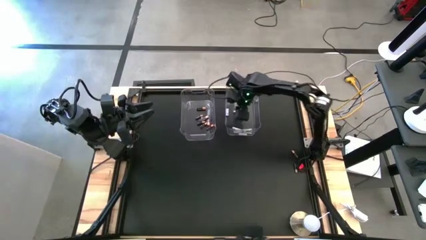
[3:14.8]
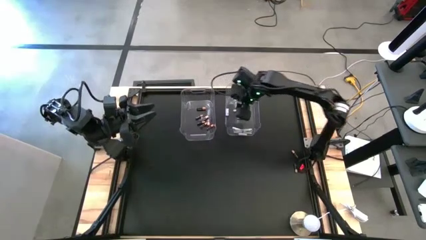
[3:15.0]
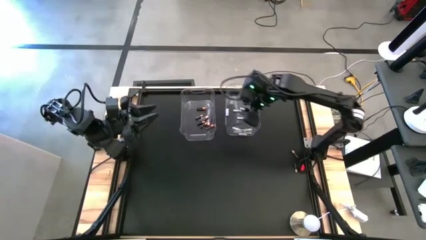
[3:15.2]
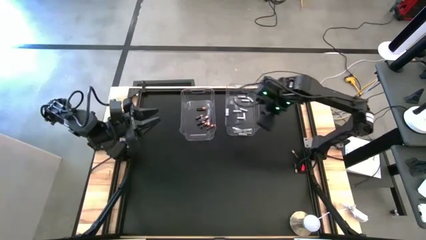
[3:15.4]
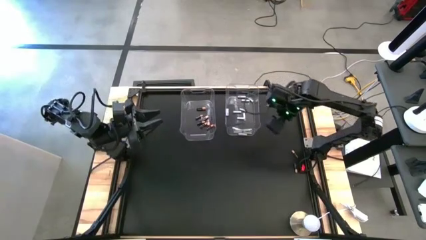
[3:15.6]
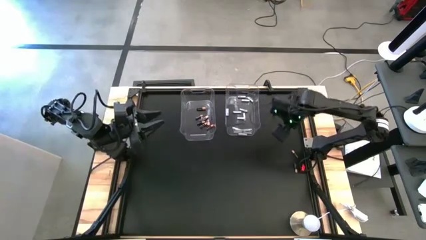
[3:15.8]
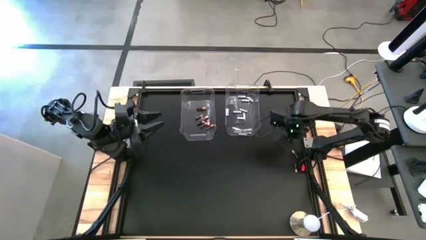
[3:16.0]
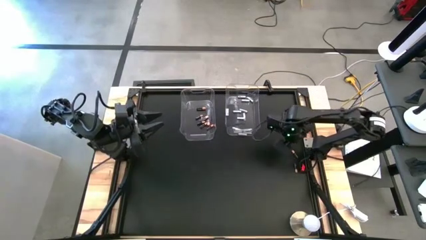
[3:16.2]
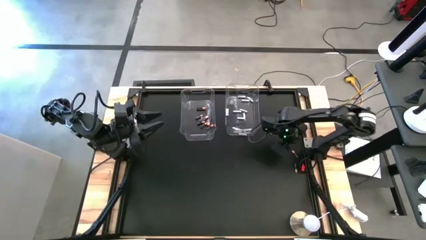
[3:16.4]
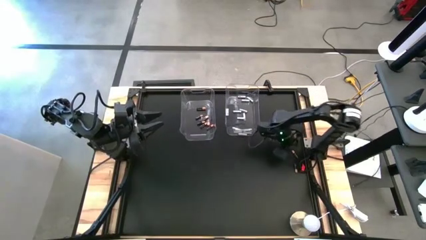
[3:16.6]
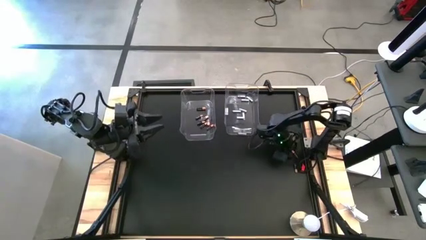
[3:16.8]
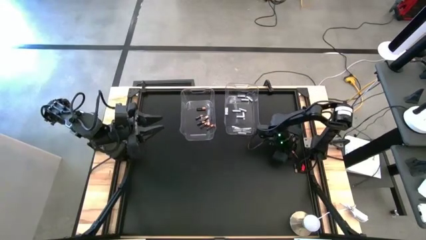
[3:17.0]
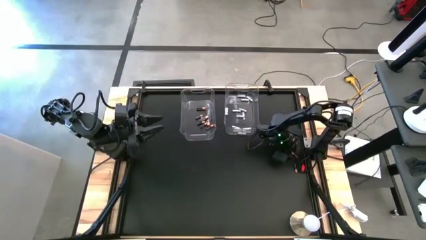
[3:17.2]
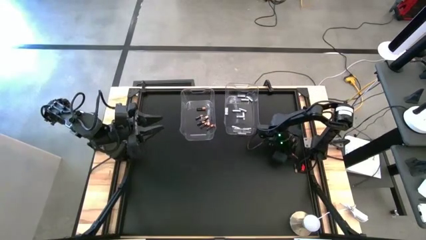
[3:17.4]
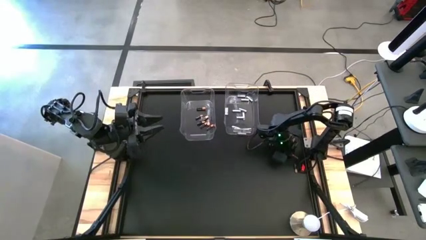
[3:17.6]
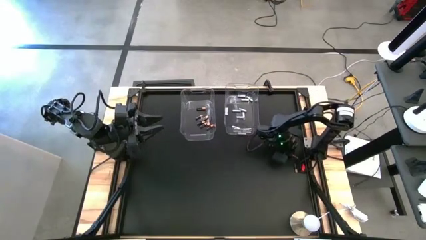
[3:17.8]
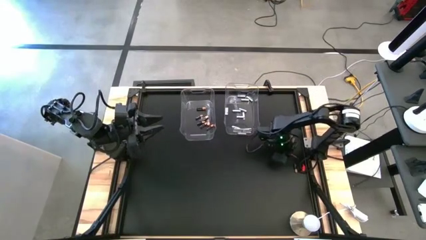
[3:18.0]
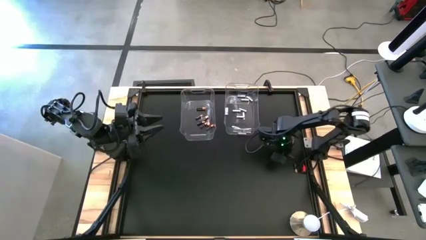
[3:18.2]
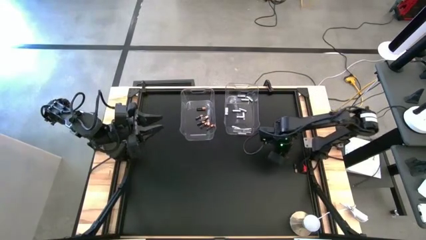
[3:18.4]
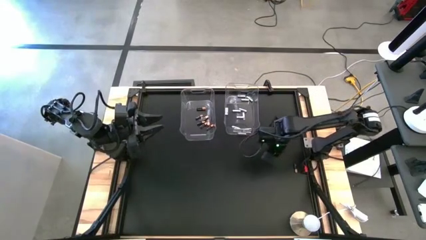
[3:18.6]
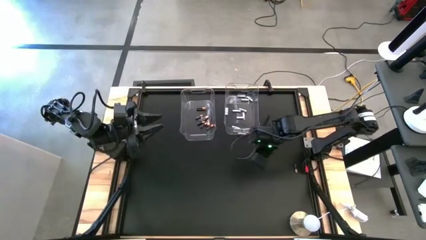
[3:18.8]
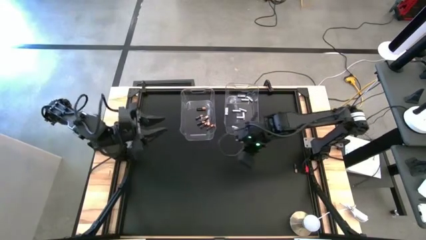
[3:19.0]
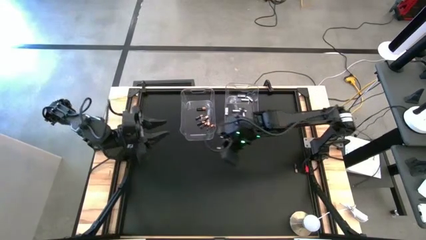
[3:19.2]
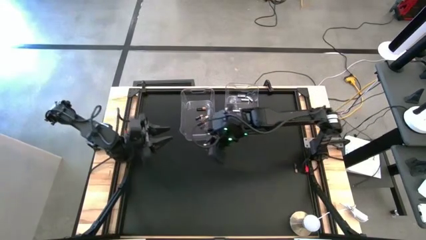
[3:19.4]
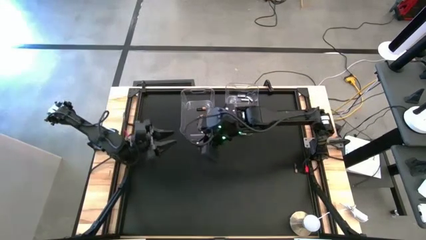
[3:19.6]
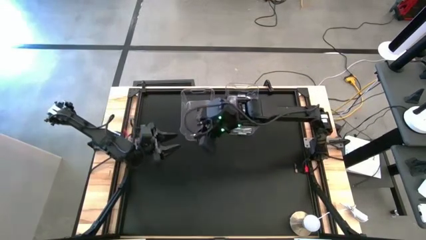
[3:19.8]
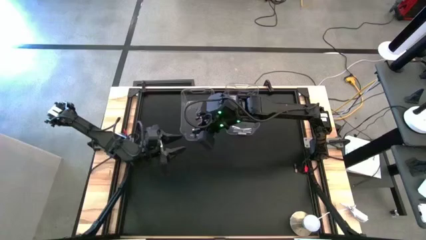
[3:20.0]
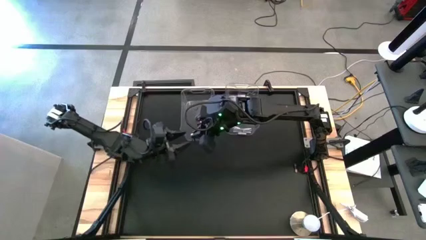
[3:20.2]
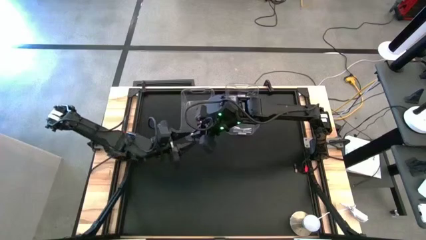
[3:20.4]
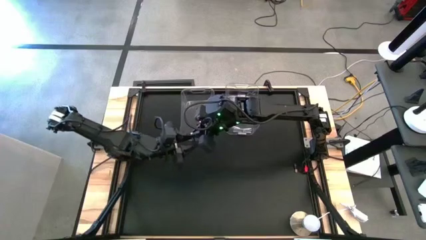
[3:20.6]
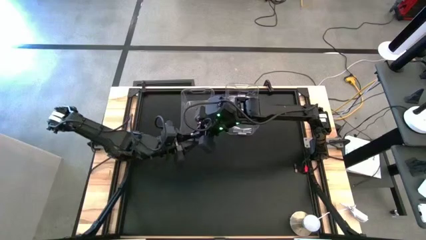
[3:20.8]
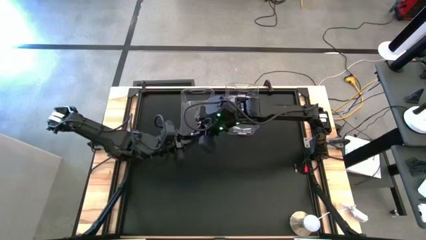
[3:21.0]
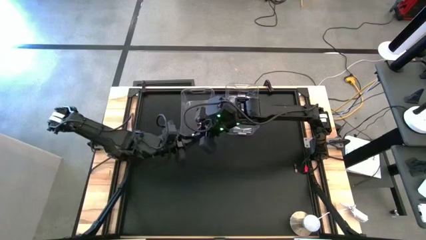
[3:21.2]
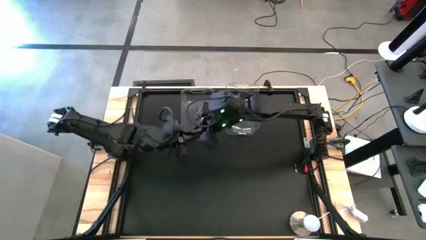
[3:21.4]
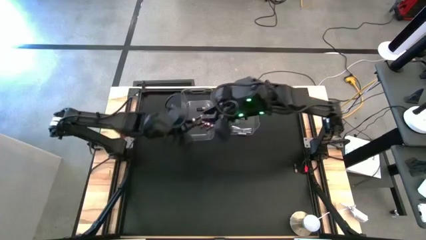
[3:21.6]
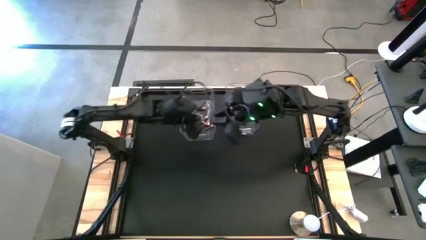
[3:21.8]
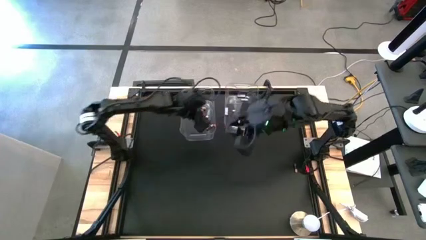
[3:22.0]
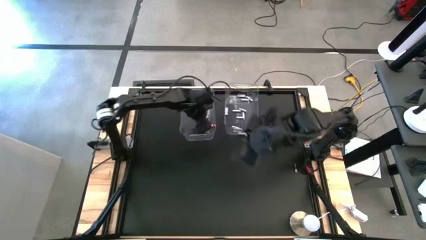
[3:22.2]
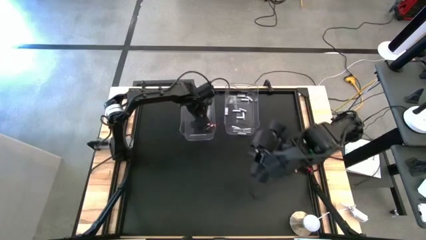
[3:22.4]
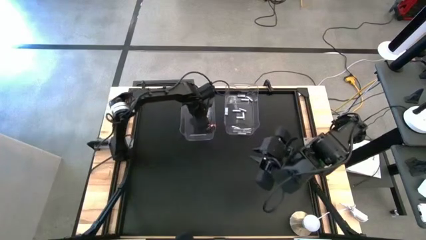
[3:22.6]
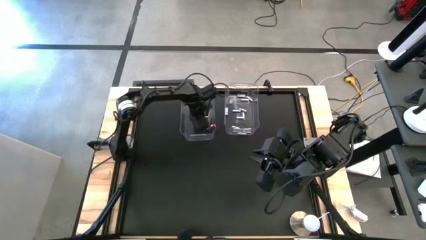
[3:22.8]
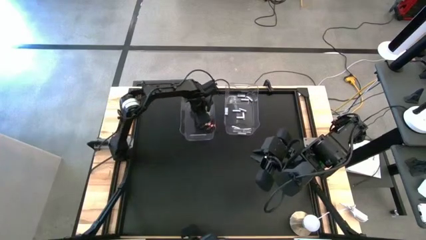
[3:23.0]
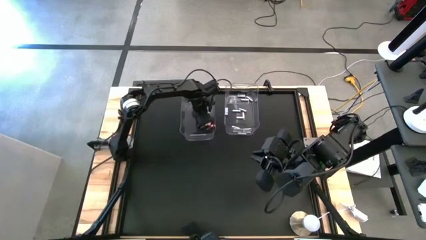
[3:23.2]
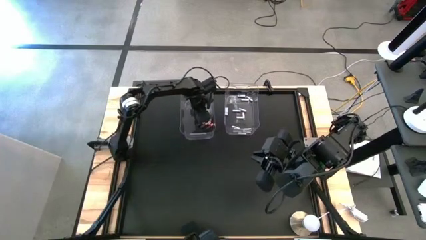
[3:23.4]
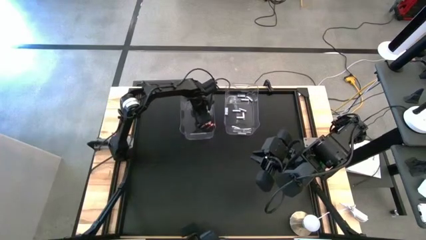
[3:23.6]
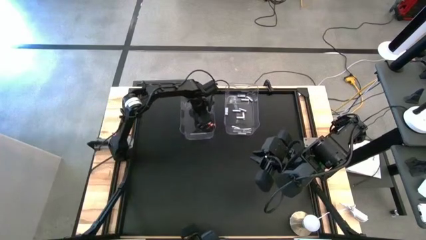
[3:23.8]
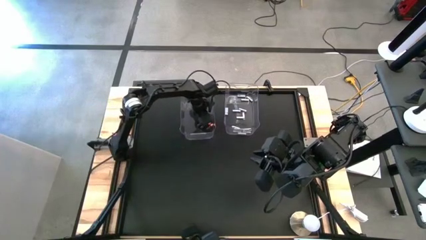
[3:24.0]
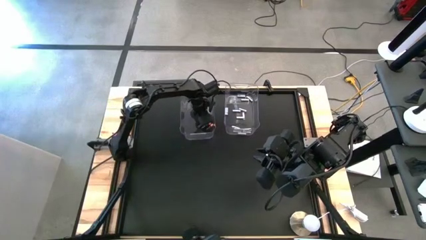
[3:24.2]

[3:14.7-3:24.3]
Task: Sort batteries
Put the black battery into the left transparent bin

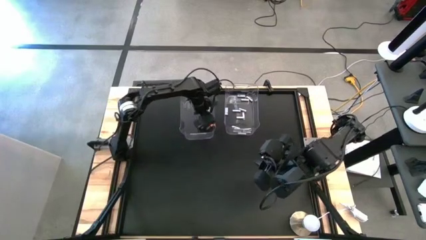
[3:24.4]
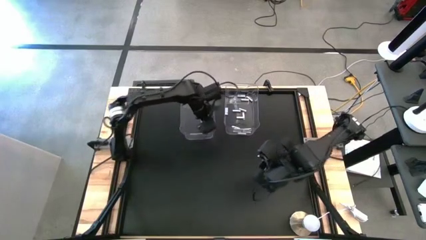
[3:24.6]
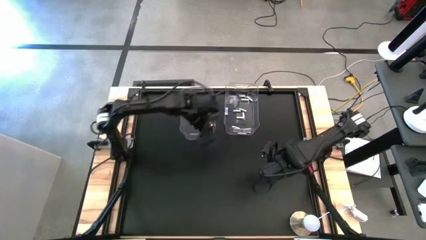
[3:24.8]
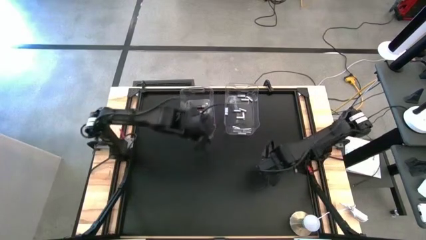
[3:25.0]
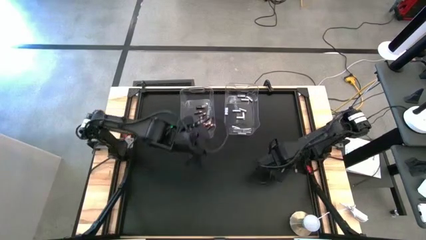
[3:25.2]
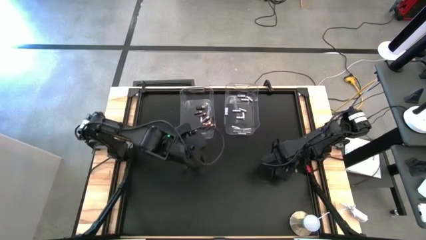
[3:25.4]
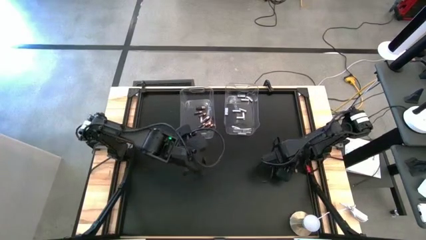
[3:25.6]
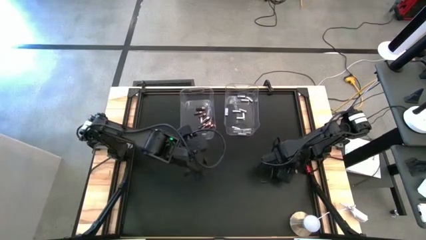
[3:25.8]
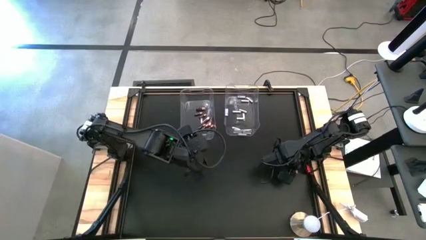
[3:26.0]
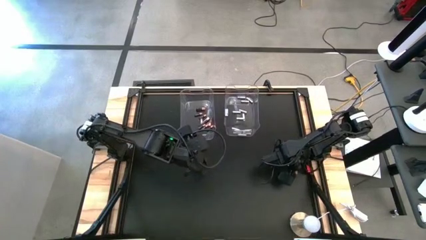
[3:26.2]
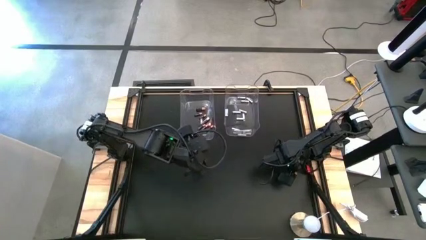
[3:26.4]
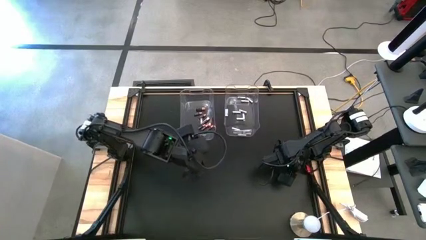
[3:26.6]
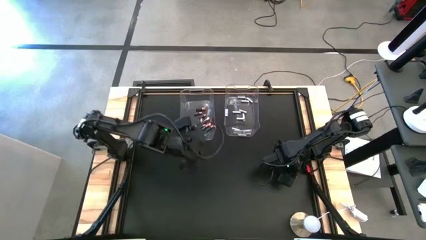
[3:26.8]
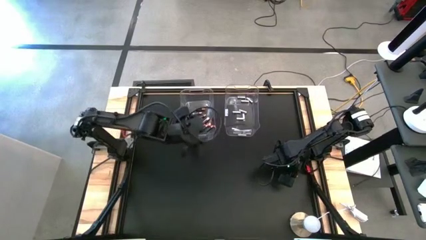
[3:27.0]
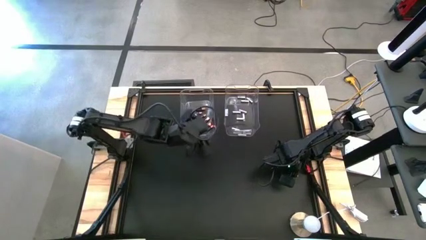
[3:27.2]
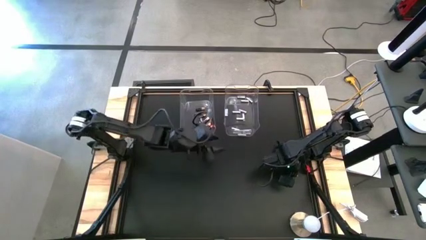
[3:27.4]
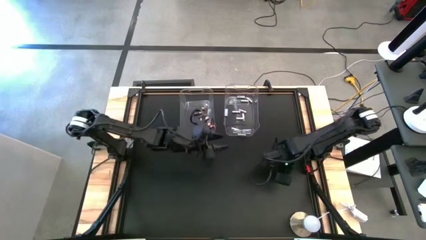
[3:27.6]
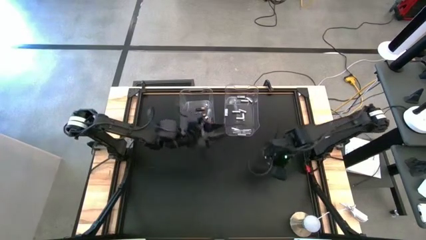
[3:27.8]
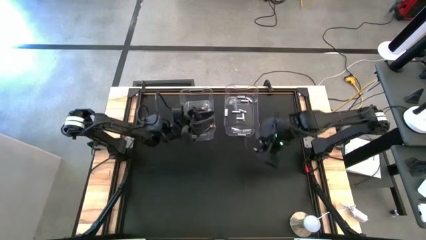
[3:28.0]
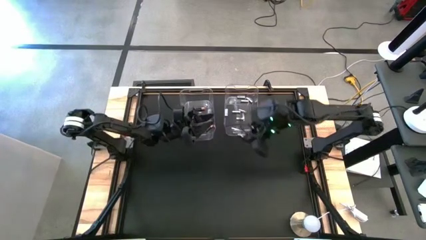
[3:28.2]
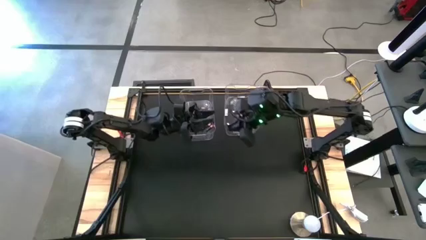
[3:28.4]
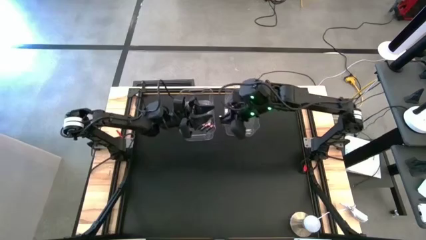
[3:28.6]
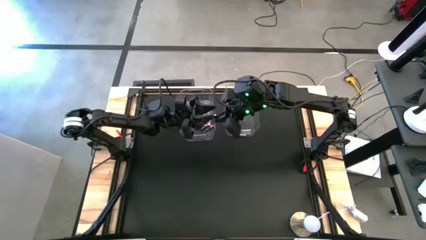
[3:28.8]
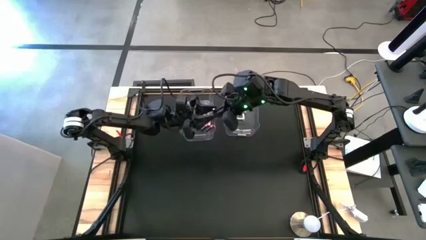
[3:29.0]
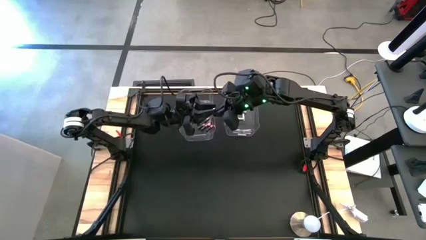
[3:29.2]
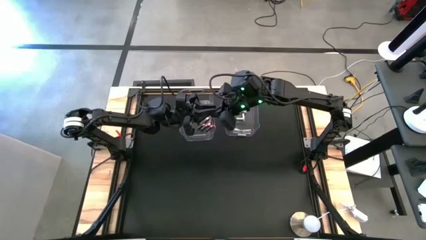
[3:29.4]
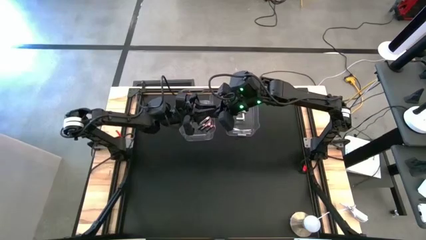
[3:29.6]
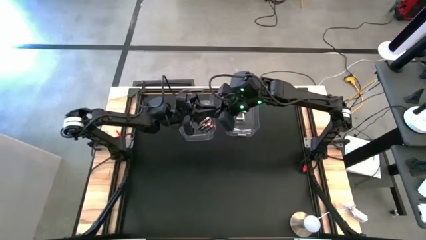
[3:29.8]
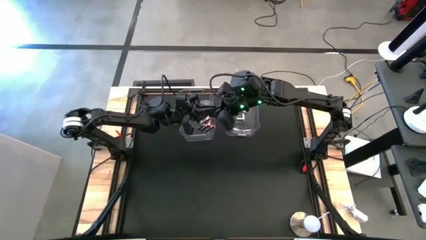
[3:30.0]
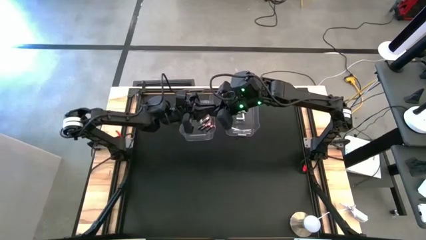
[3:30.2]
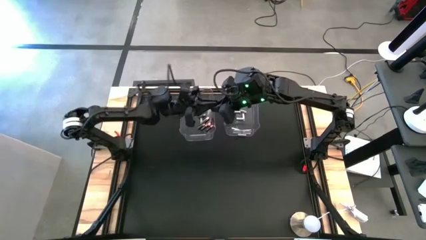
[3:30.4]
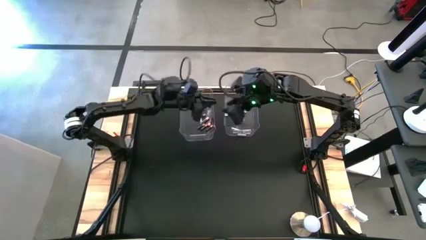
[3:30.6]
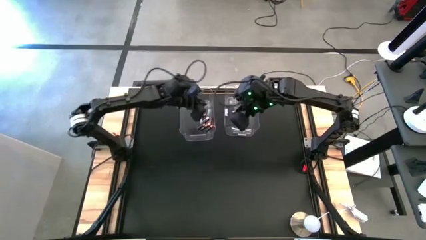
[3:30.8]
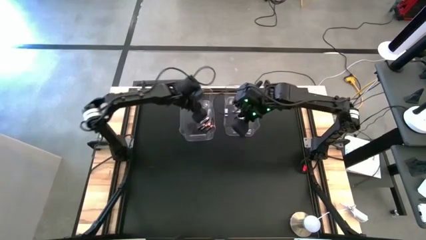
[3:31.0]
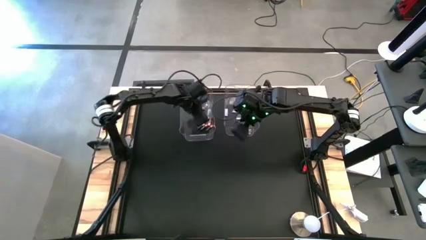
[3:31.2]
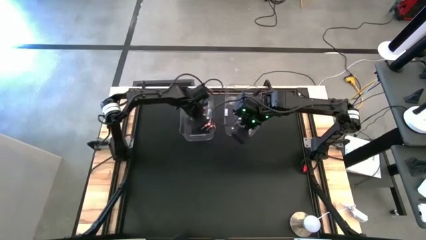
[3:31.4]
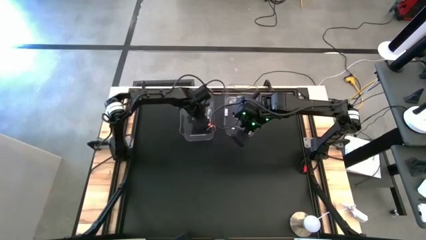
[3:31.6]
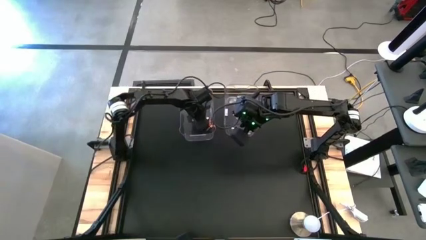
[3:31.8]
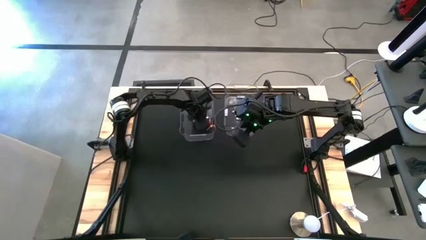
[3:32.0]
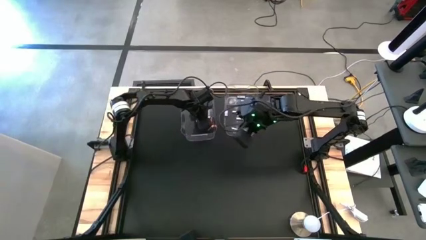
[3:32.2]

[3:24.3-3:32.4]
Put the black battery into the left transparent bin
